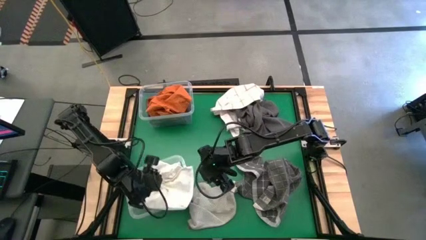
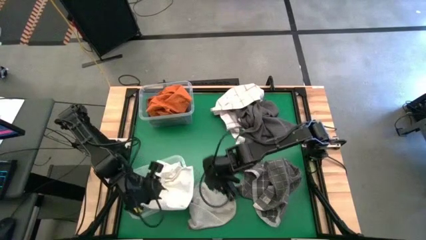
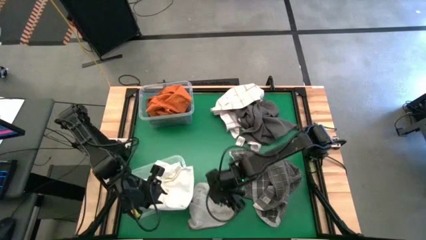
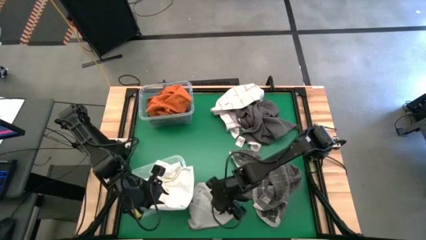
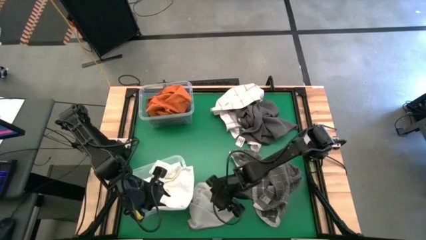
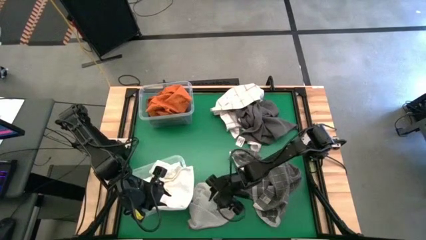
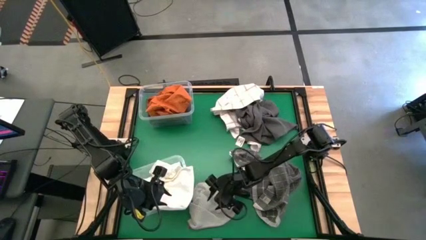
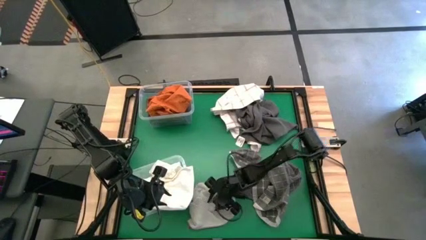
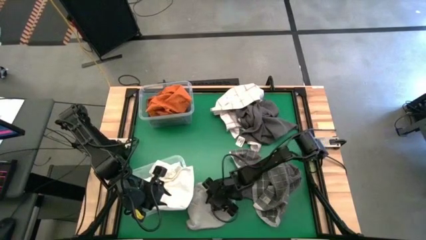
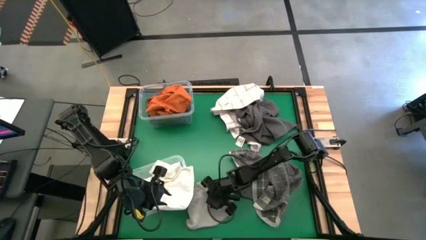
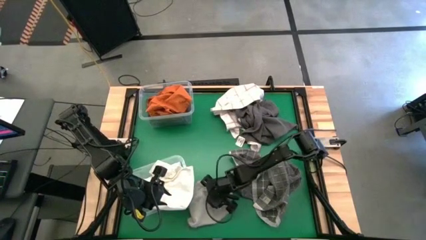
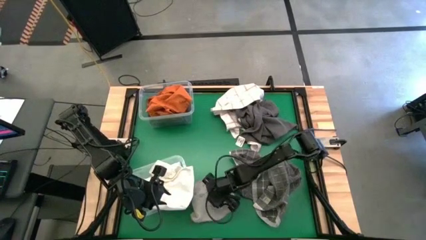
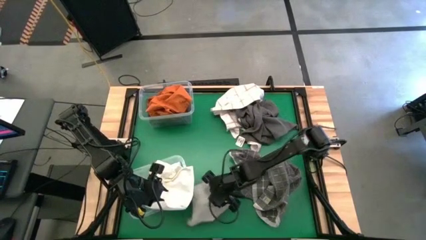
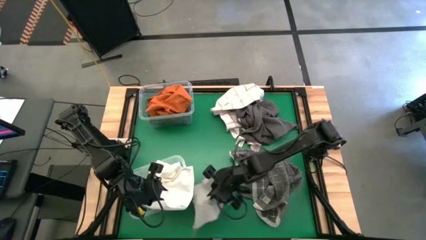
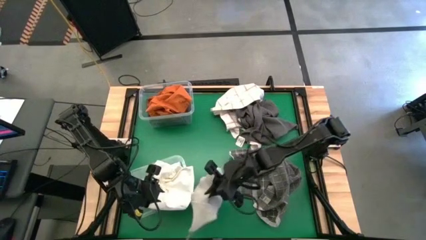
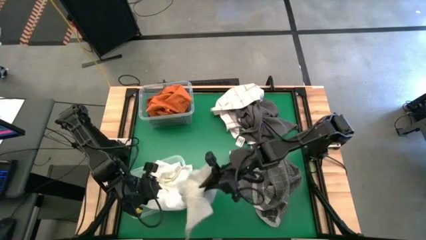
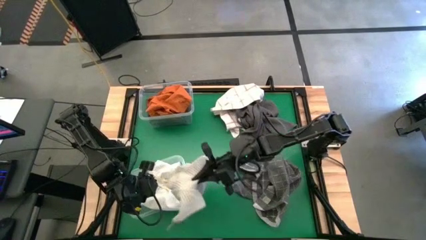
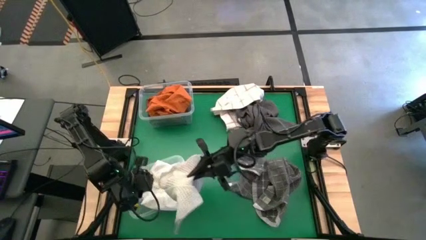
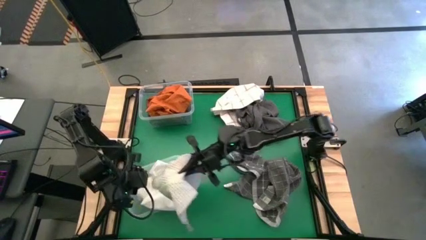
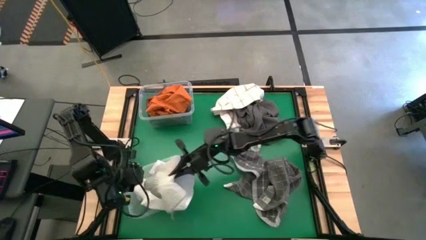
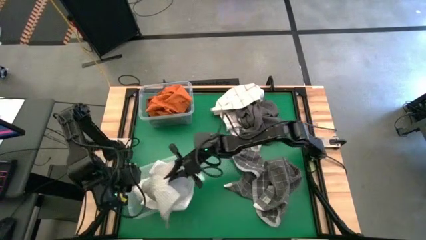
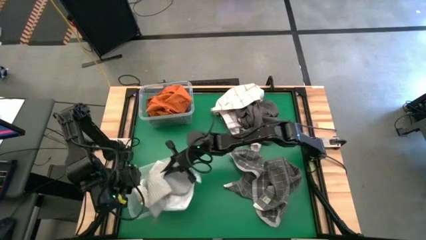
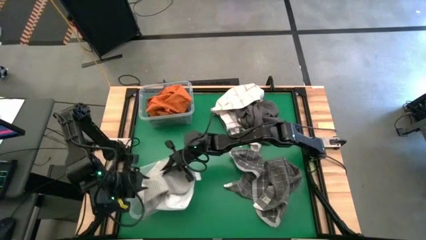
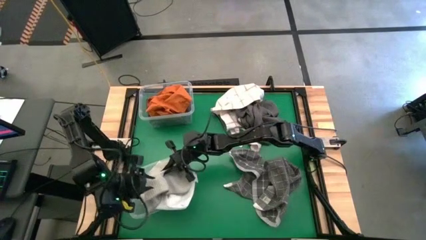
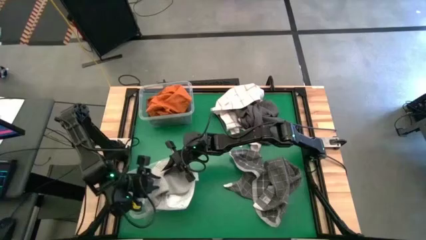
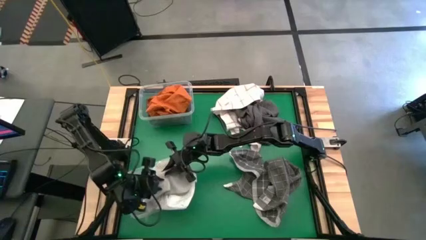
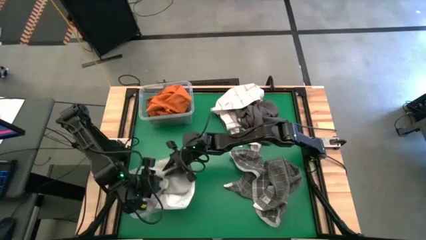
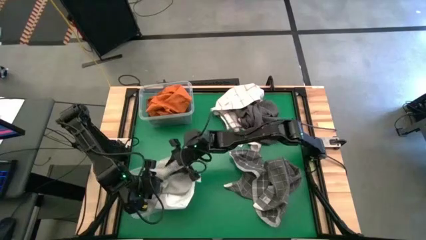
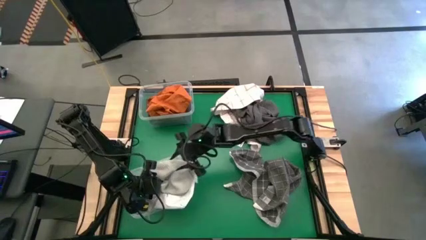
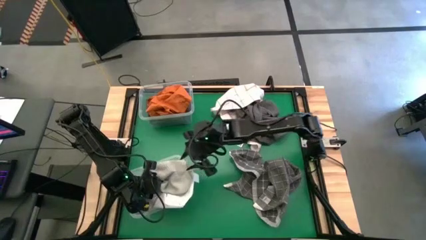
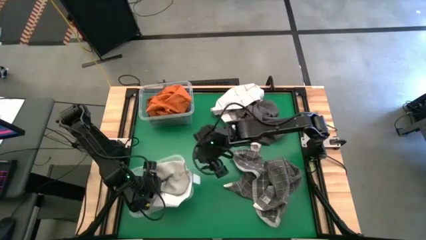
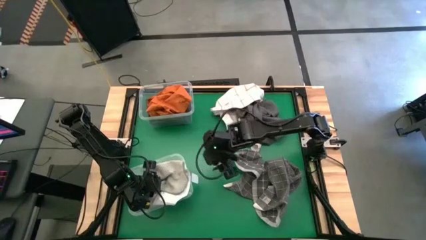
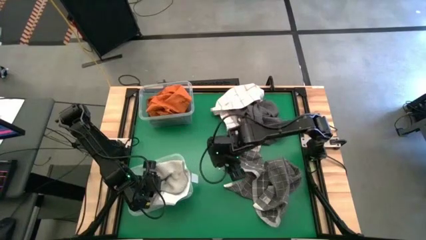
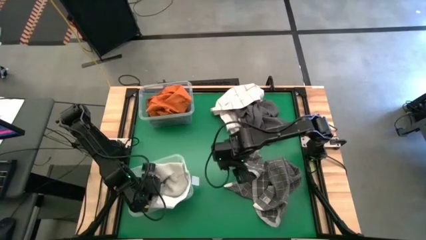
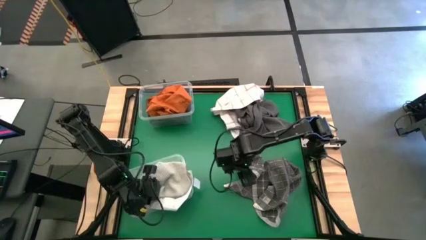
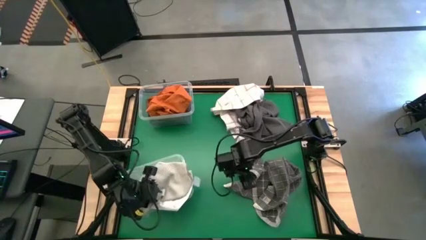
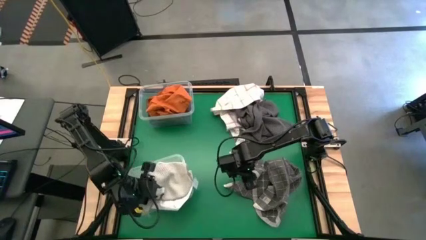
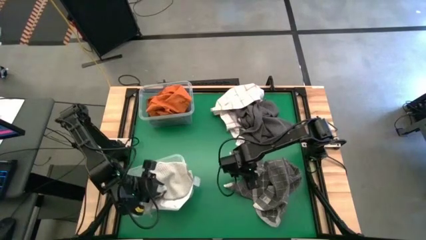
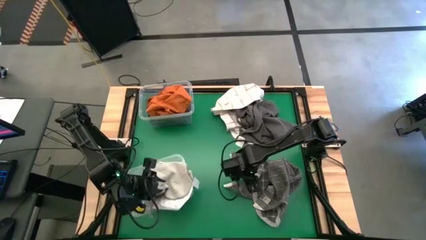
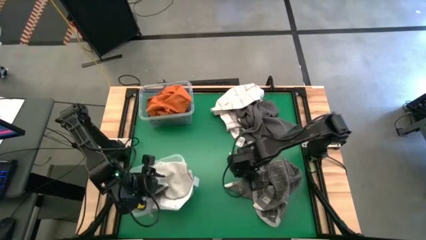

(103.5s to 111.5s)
Task: Sort towels by color in basket
Put the gray towel into the bottom transparent bin

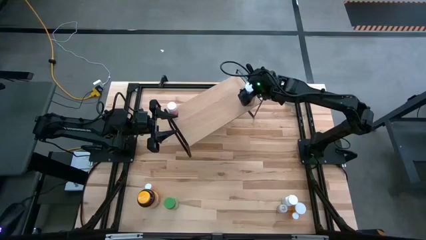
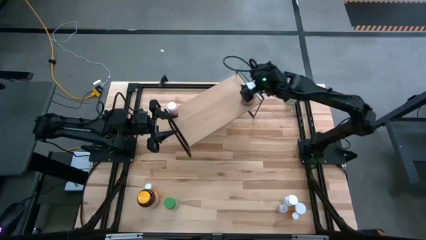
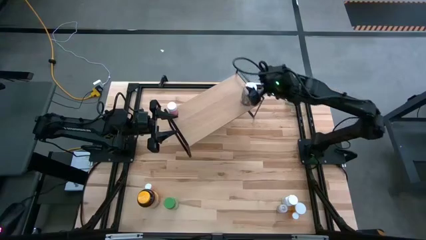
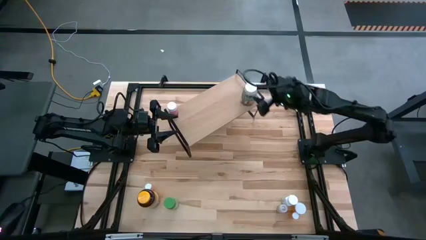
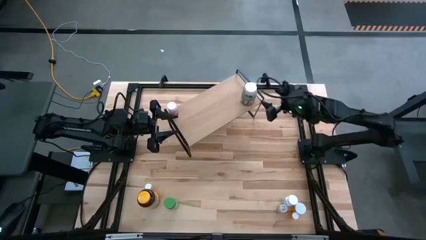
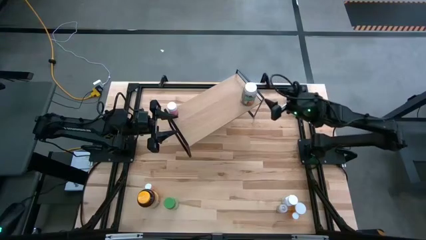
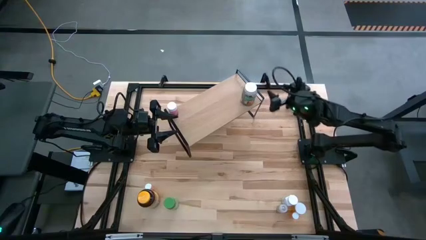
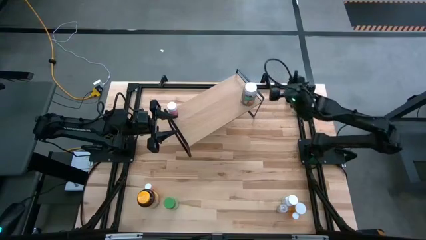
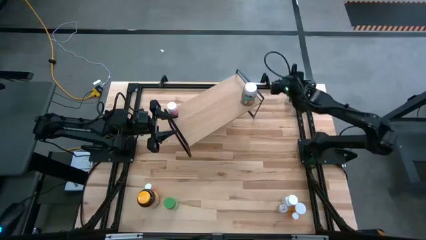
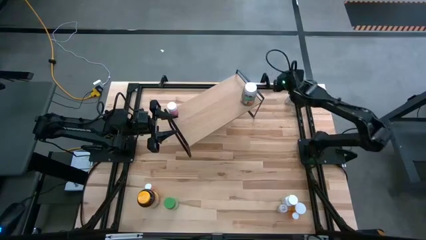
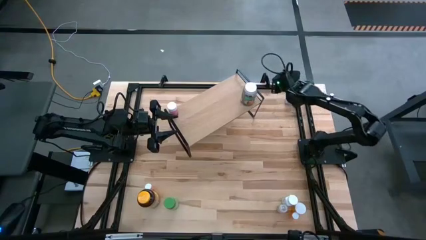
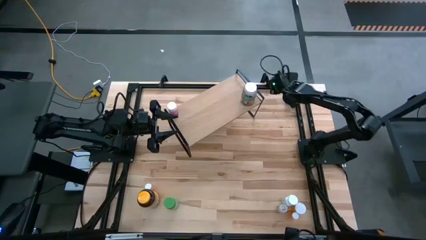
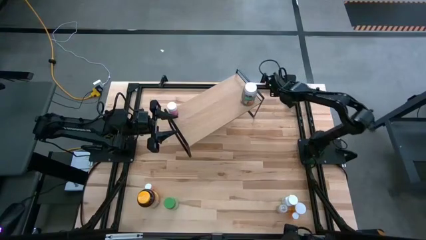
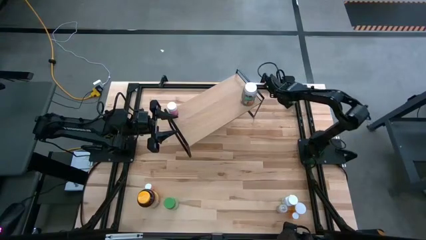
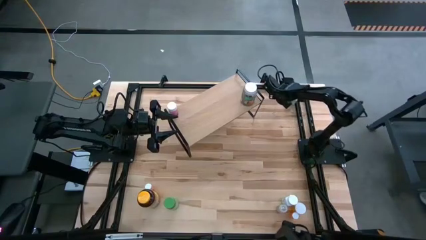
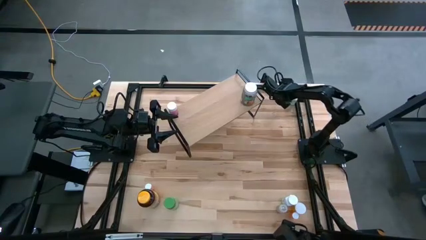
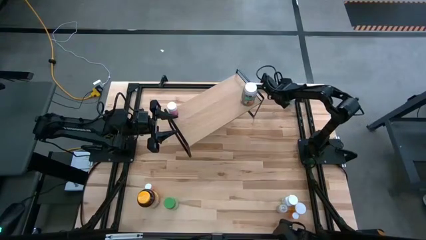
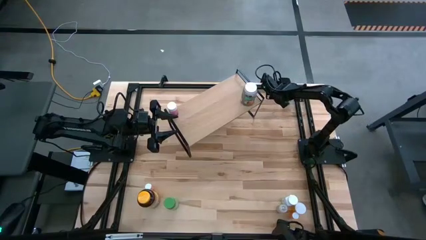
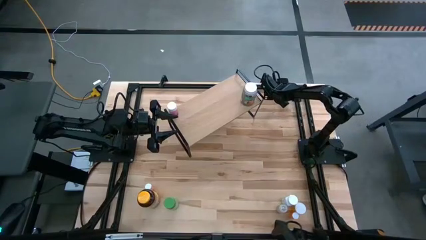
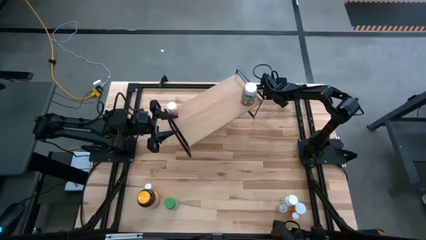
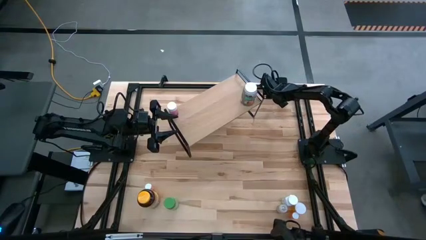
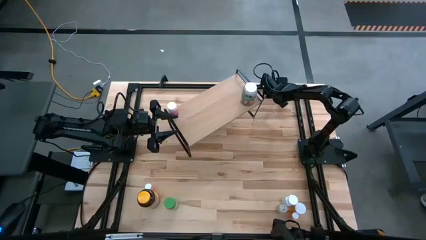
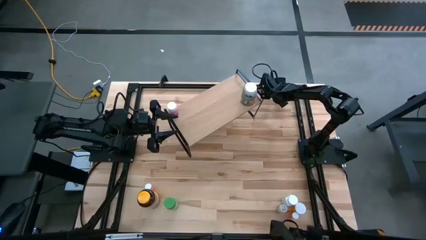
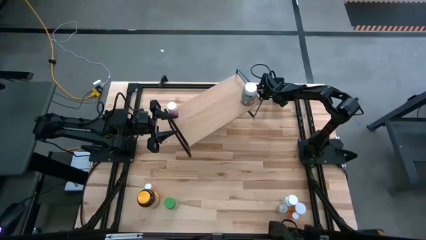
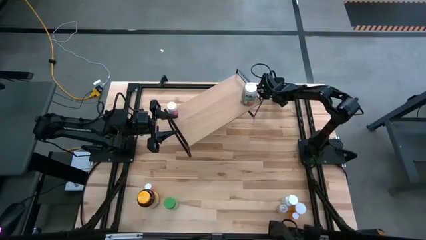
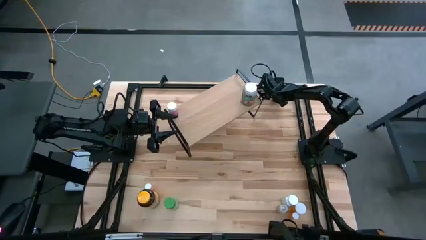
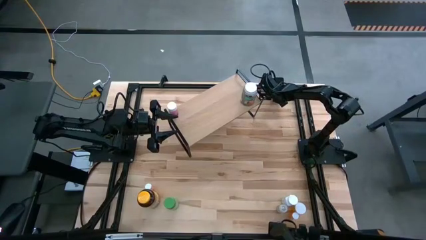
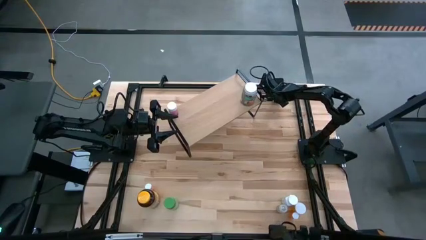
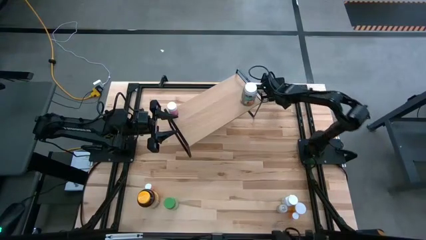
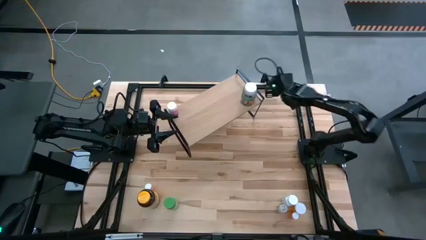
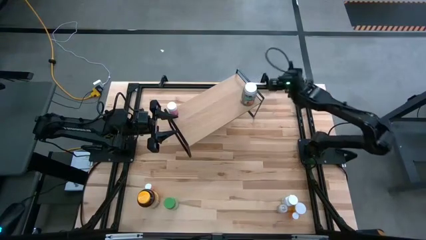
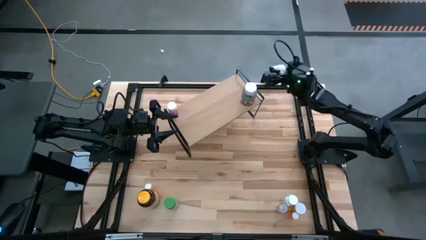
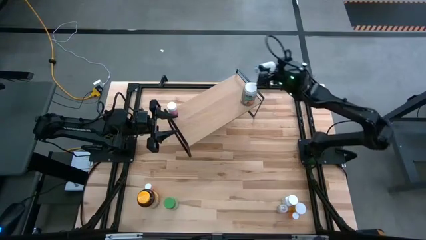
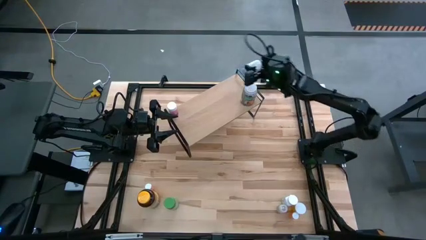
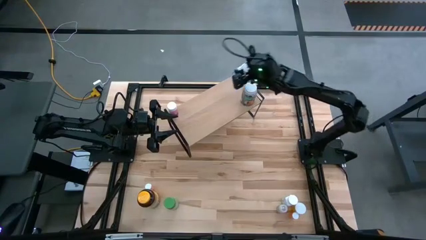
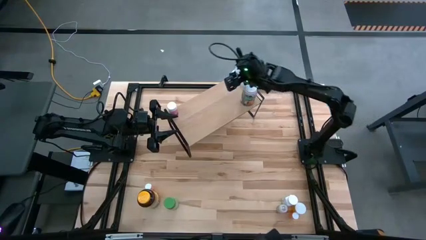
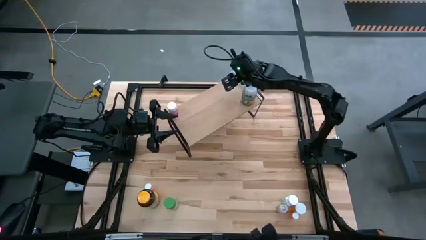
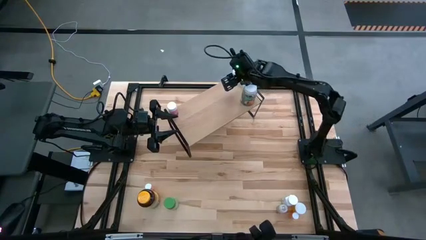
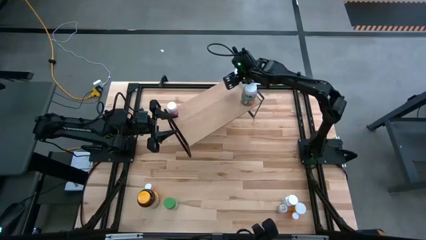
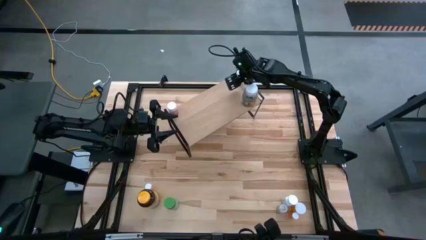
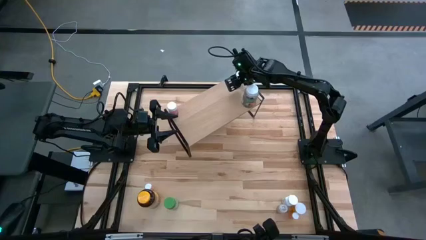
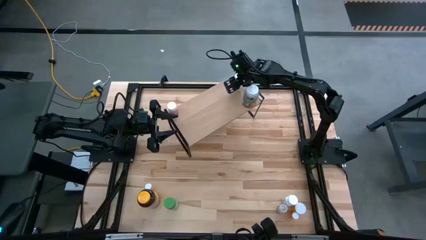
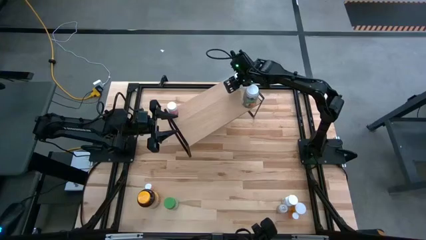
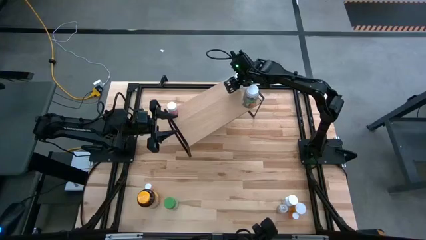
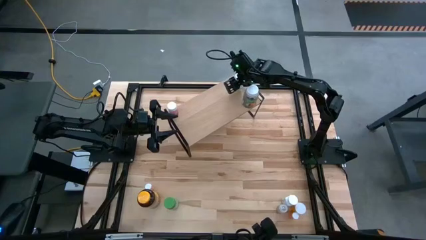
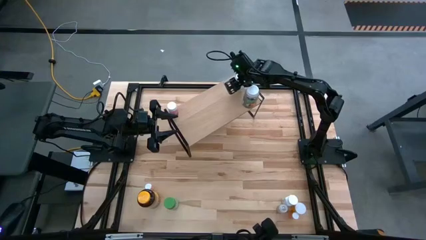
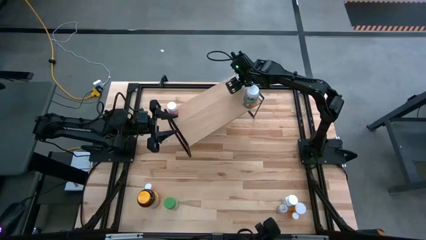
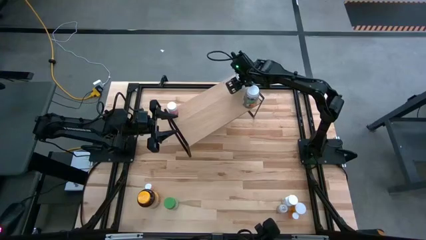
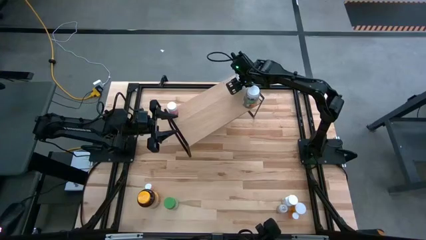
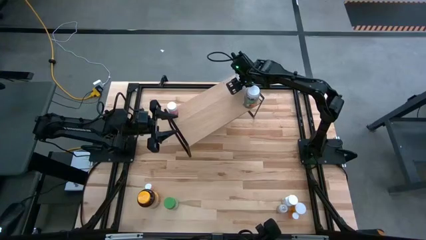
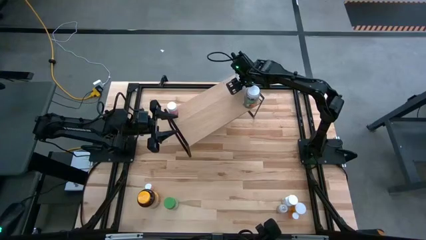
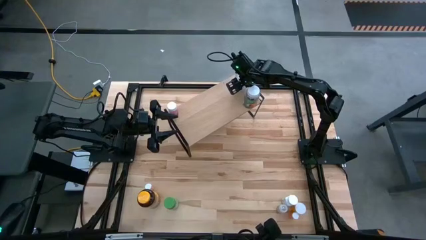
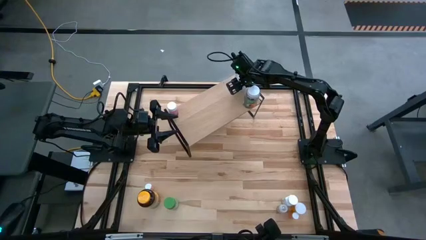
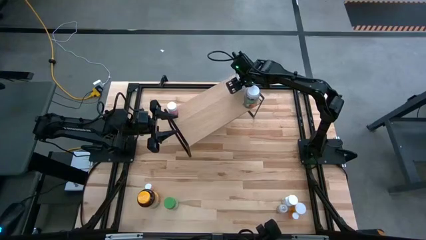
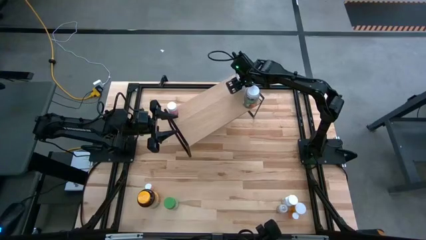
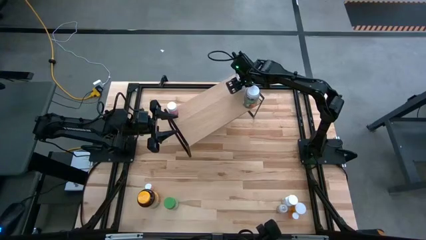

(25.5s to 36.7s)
Task: Pick and place medicine bottles onto shelf by color
Put the top blue medicine bottle on the shelf
